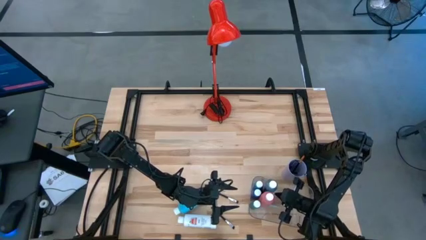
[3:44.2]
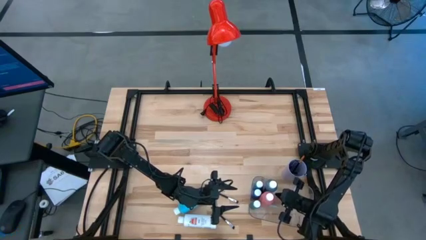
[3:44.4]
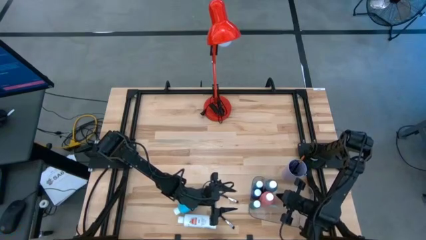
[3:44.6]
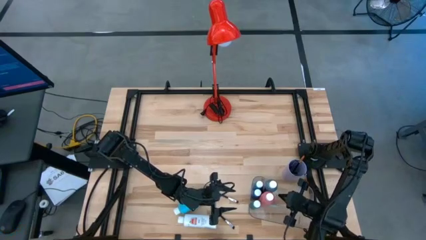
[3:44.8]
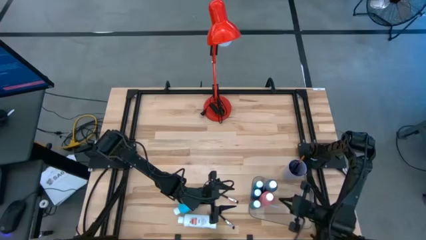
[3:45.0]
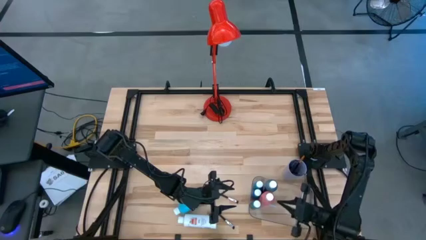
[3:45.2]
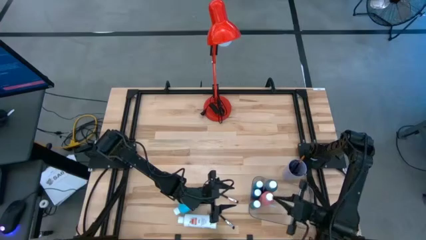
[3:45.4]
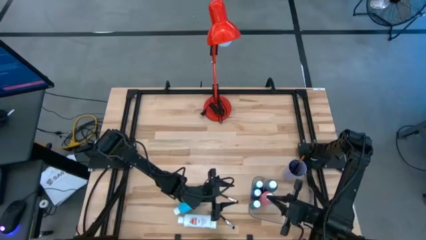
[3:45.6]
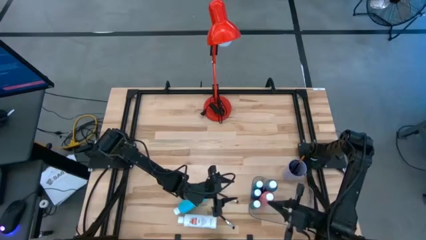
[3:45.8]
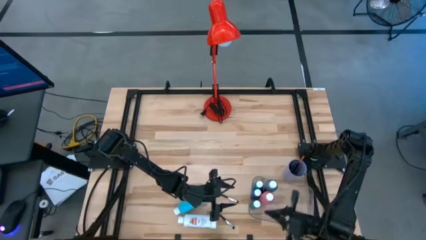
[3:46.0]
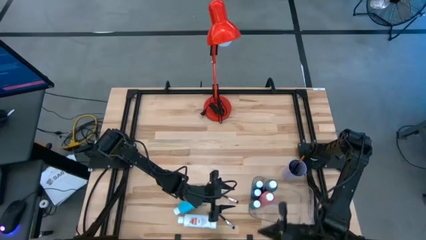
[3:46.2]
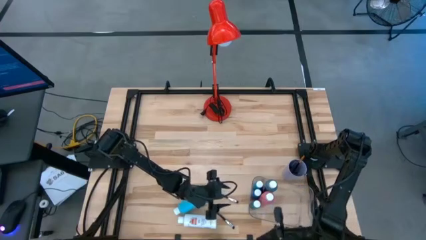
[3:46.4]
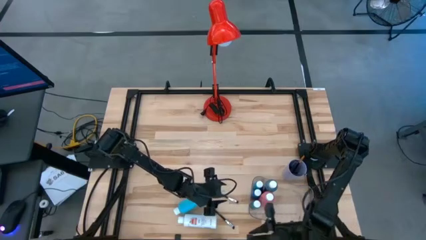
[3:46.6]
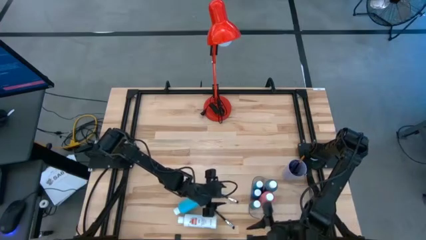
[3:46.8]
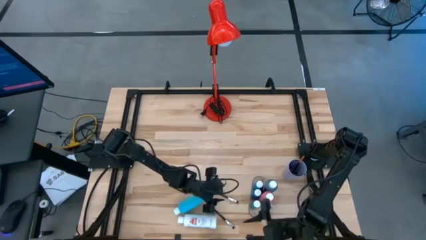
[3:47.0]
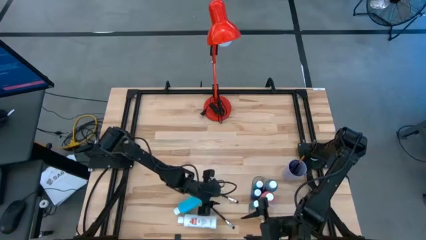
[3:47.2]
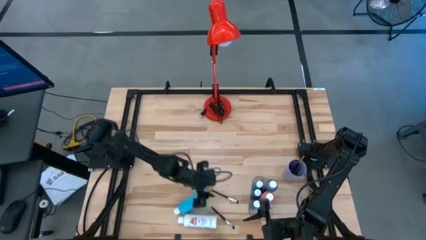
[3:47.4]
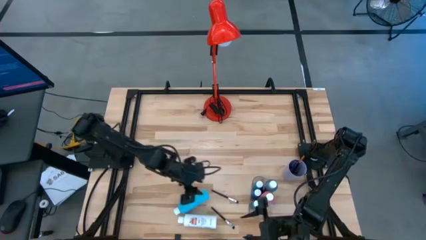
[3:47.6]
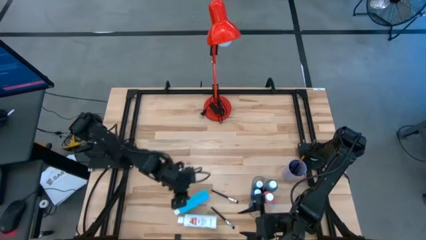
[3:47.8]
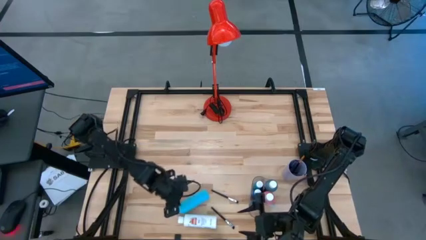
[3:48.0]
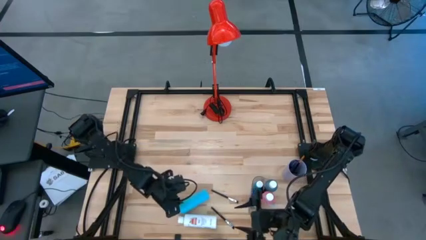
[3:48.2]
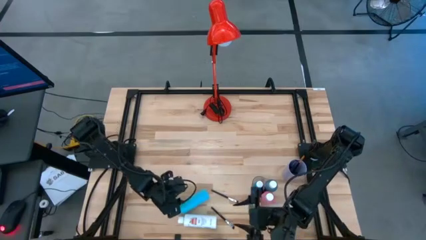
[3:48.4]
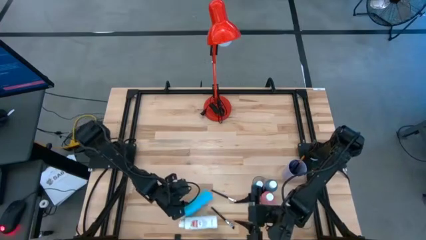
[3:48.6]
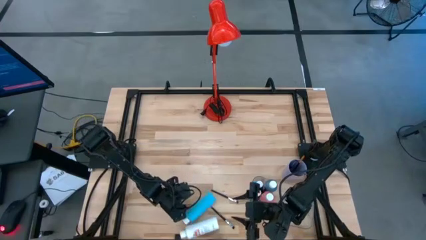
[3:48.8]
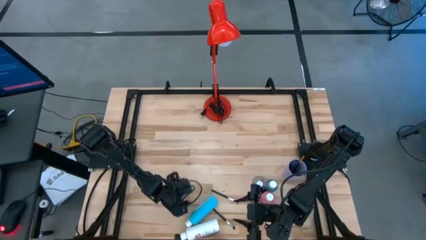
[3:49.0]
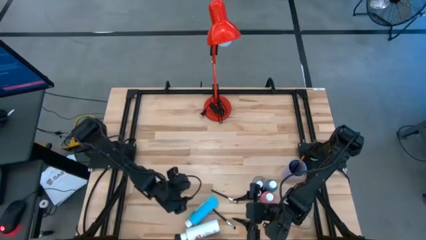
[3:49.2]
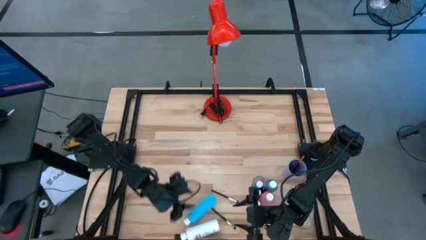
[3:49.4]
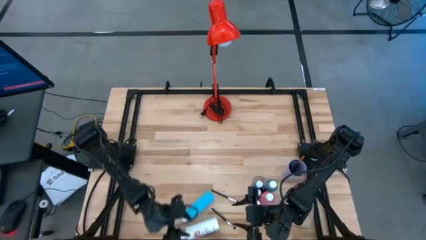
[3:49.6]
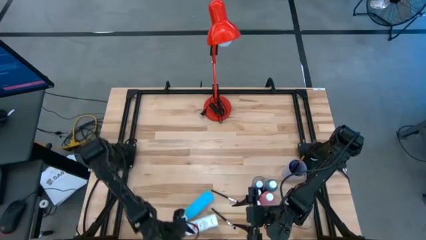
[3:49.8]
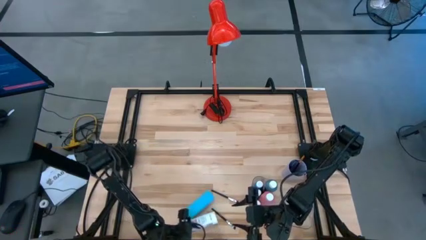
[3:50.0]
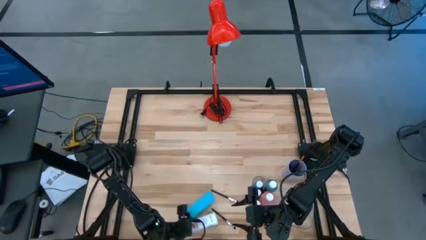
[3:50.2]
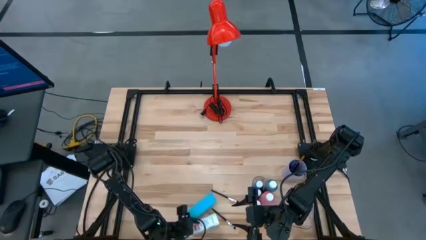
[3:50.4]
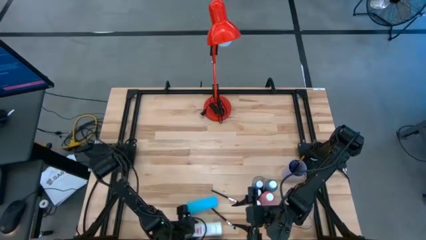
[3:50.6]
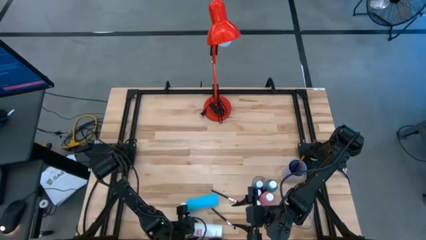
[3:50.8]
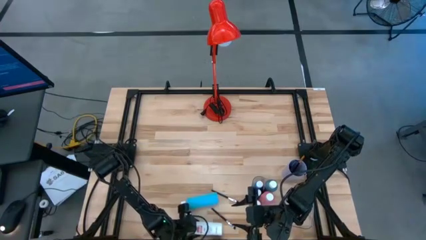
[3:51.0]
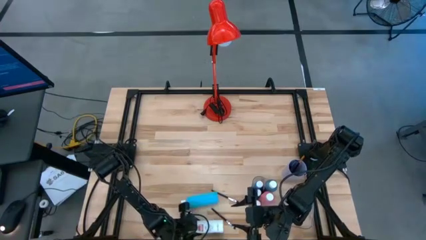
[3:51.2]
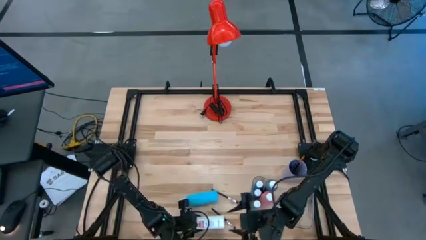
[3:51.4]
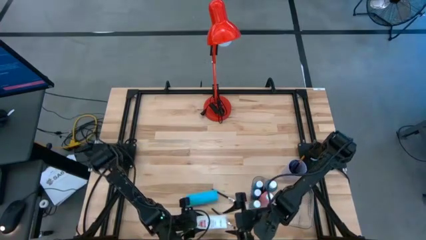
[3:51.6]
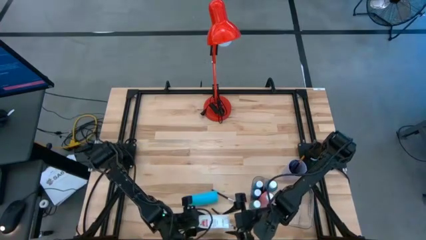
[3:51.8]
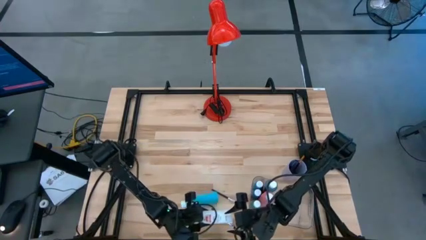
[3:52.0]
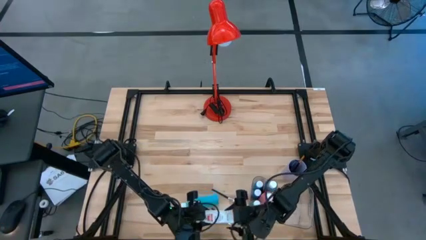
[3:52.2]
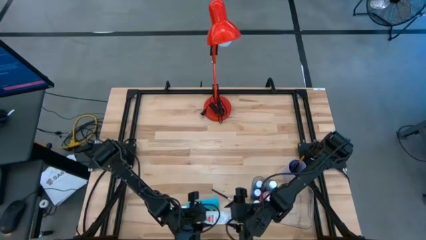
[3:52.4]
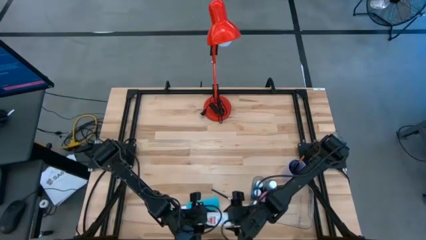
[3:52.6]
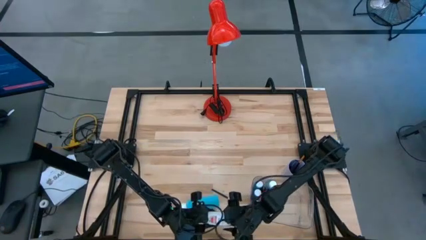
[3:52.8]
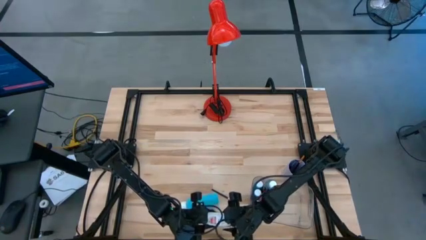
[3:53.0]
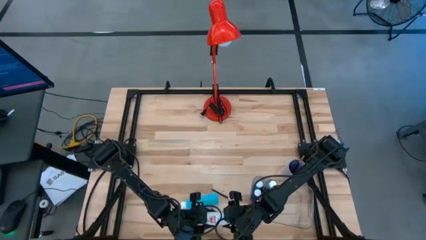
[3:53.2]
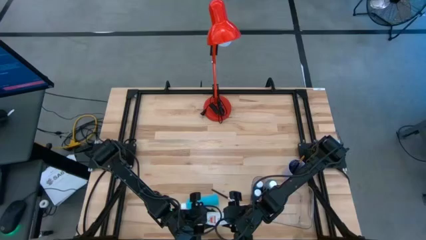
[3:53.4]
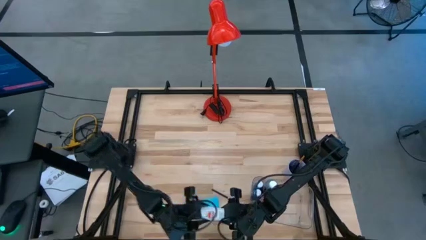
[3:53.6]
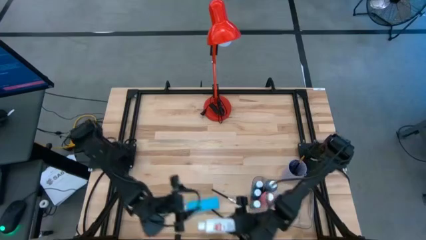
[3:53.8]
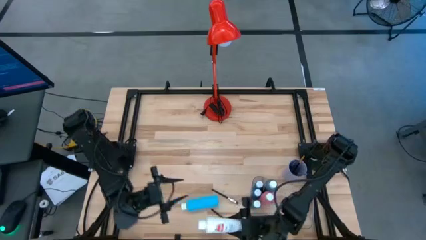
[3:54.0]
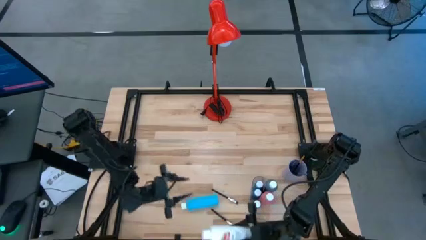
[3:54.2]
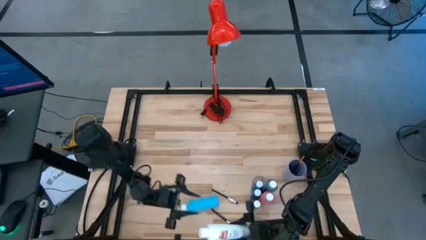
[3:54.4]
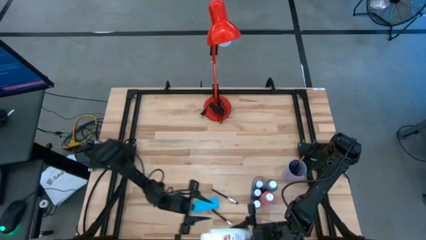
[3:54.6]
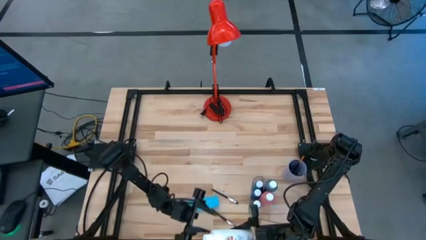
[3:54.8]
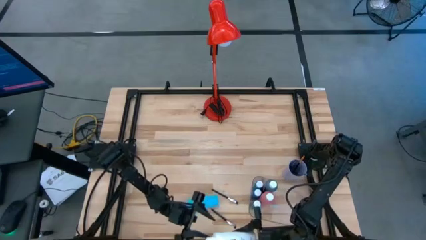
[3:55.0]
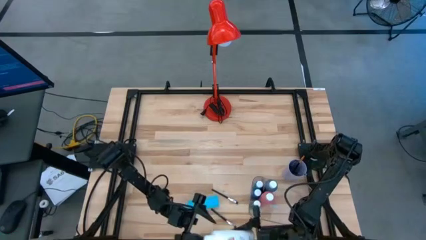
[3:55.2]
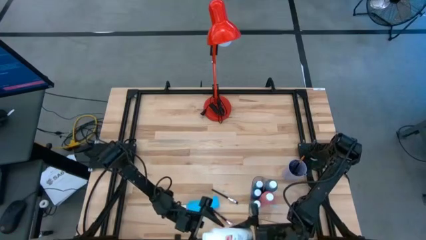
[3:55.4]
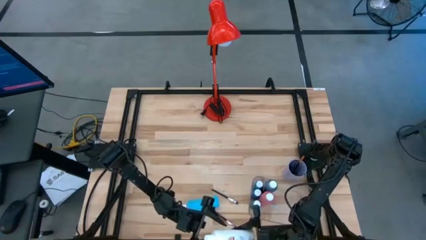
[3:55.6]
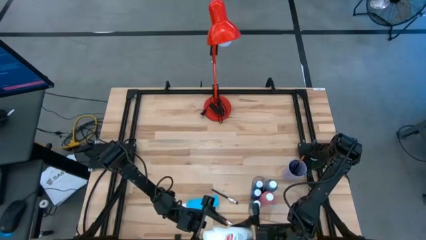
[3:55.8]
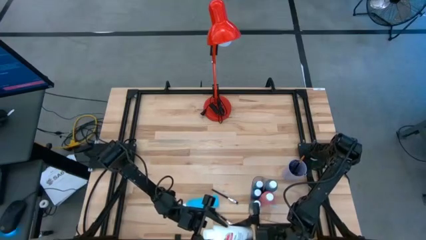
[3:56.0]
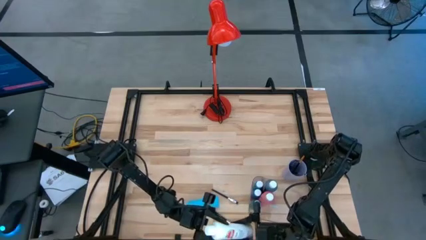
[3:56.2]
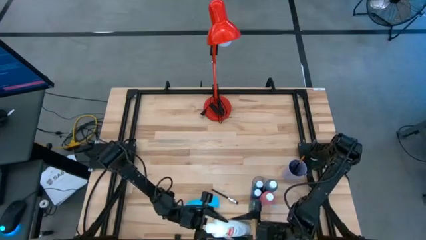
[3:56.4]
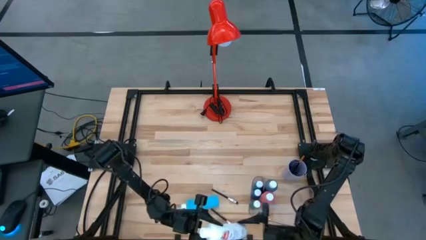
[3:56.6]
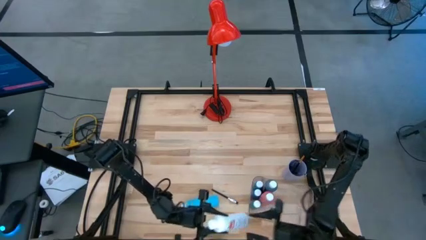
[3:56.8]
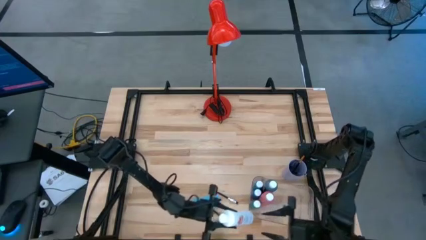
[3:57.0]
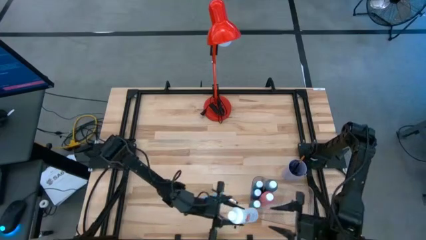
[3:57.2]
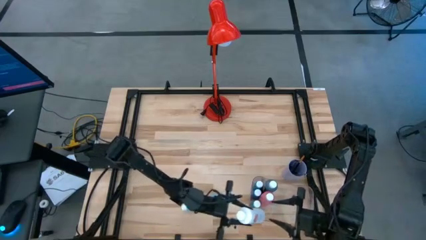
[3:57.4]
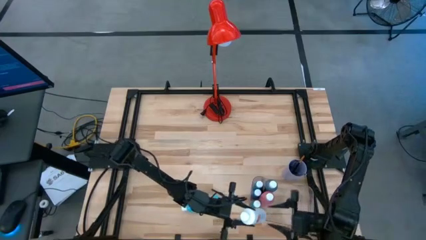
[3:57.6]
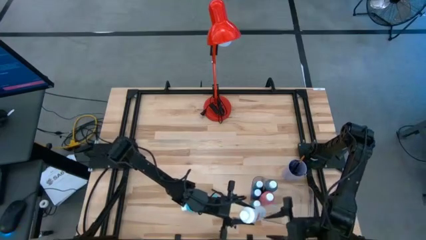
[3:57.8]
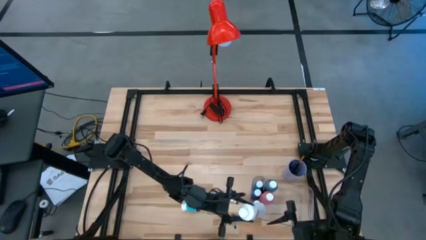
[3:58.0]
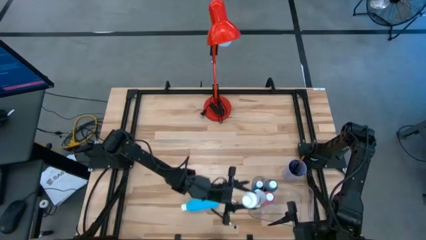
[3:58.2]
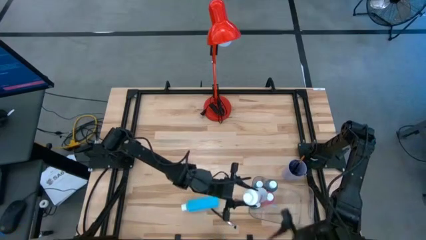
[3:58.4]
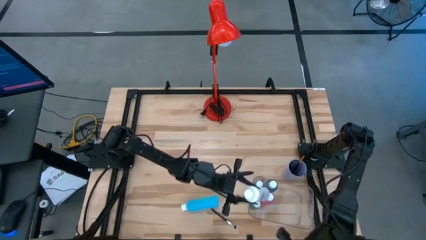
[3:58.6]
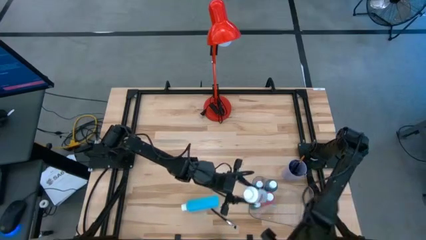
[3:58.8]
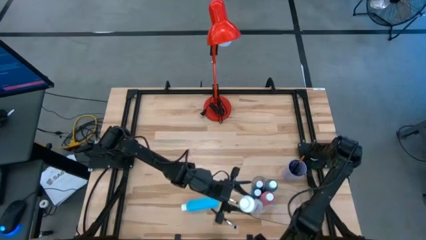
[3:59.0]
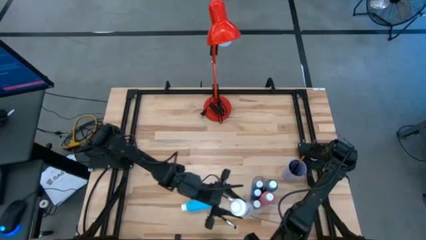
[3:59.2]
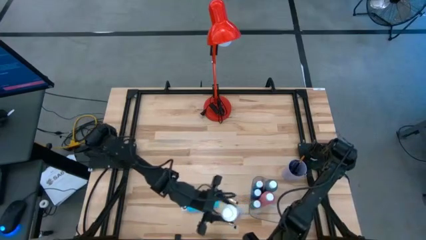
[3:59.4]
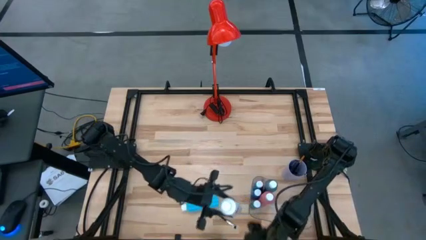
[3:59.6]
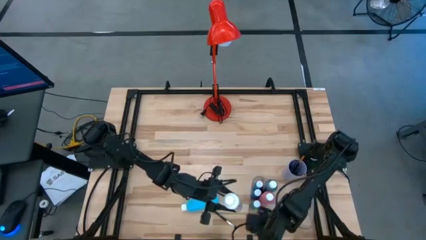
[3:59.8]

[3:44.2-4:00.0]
Task: Pick & Place Paint Supplies
Put the white paint bottle into the transparent bin
